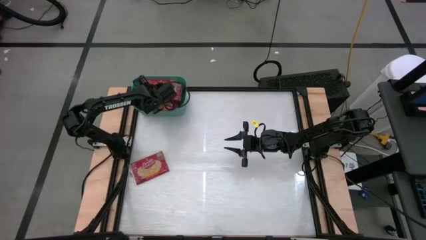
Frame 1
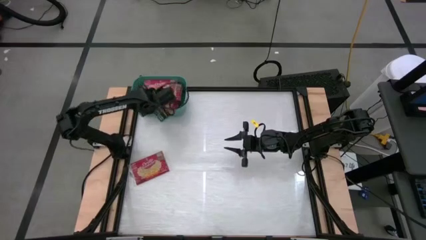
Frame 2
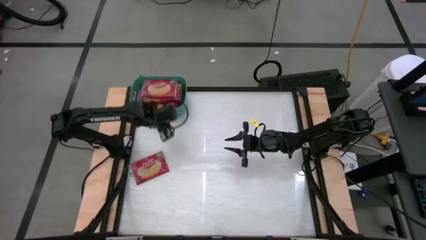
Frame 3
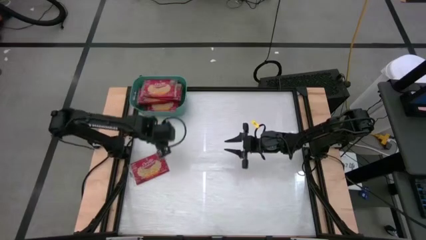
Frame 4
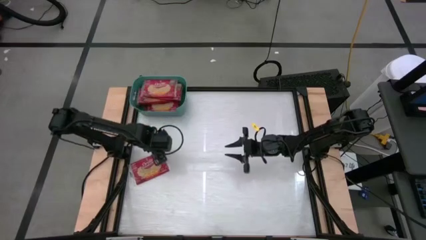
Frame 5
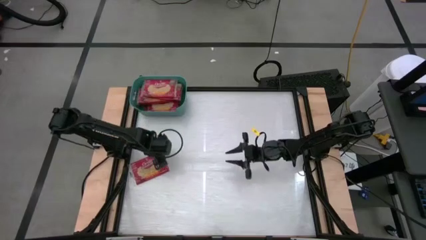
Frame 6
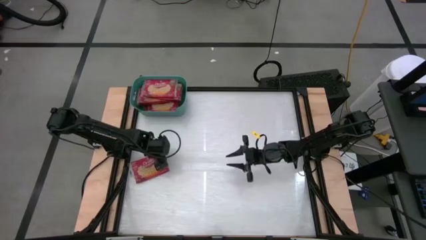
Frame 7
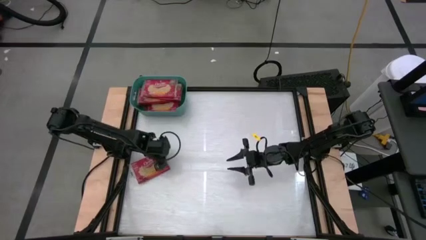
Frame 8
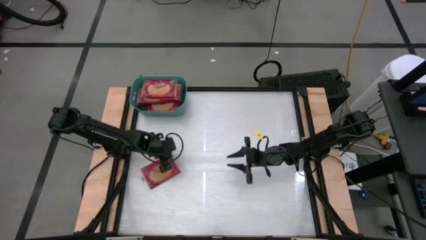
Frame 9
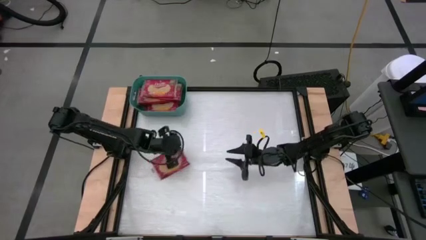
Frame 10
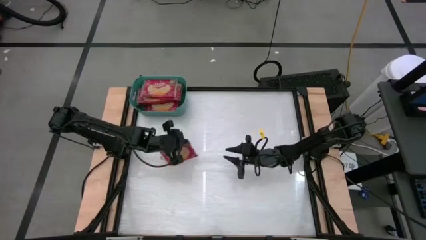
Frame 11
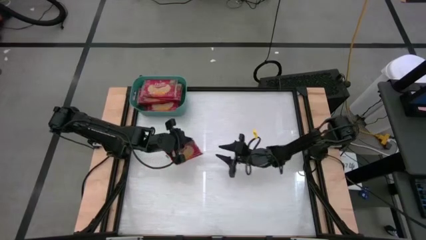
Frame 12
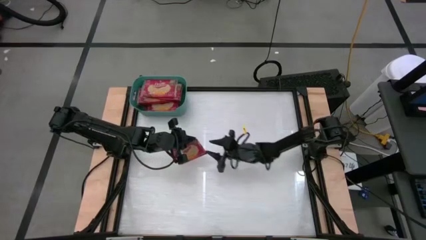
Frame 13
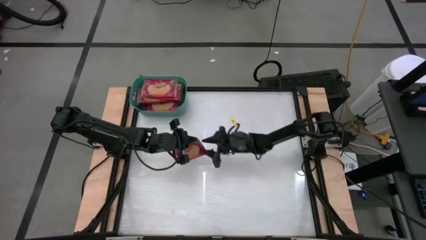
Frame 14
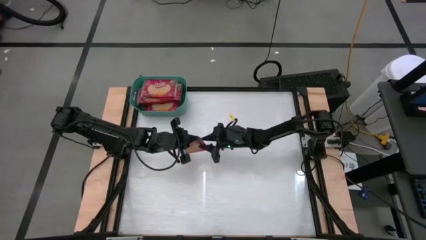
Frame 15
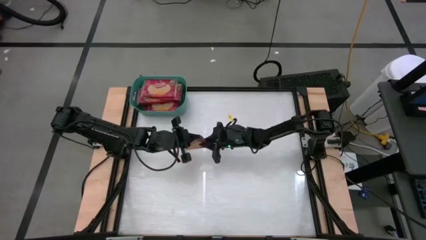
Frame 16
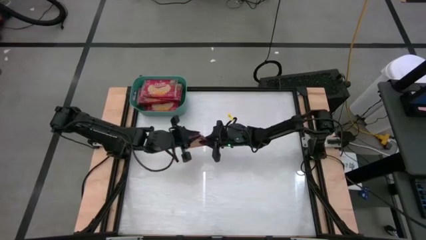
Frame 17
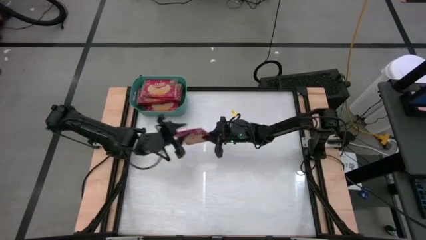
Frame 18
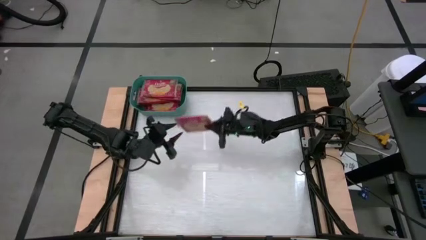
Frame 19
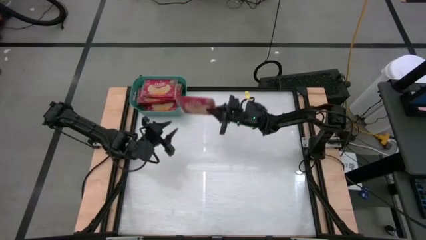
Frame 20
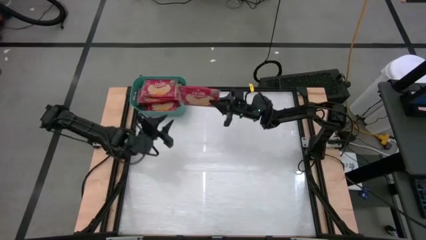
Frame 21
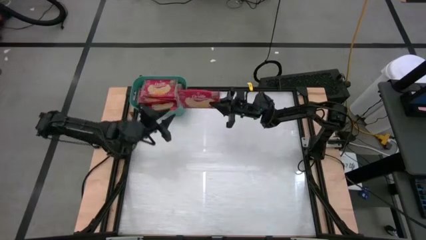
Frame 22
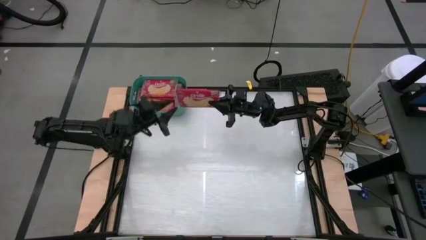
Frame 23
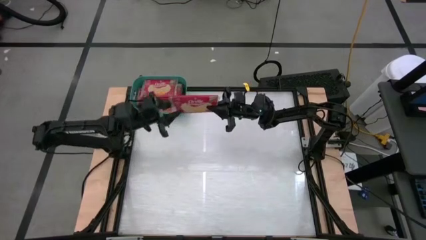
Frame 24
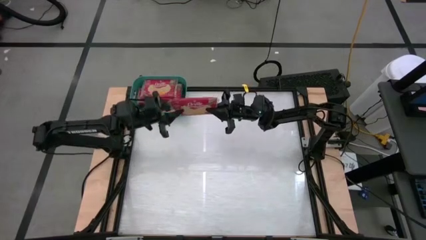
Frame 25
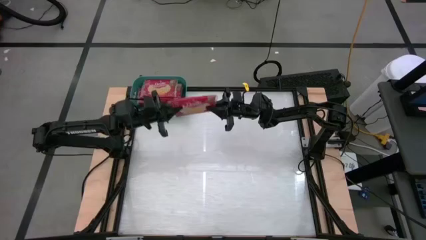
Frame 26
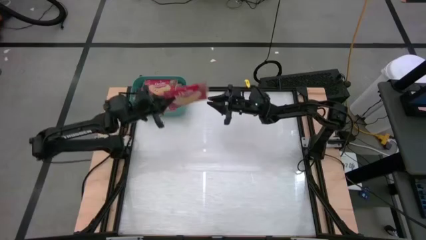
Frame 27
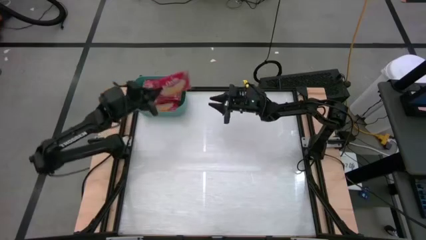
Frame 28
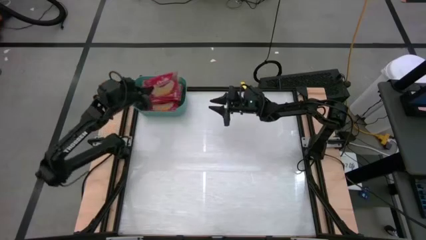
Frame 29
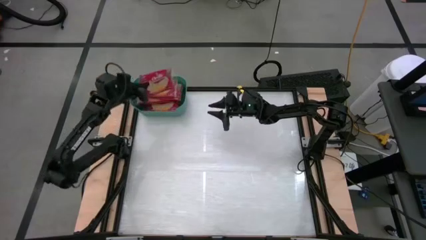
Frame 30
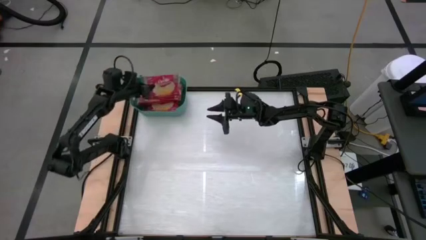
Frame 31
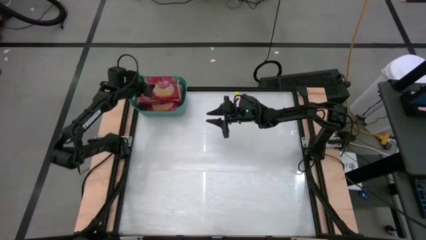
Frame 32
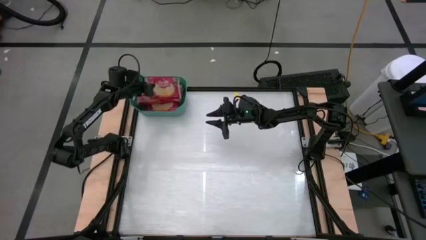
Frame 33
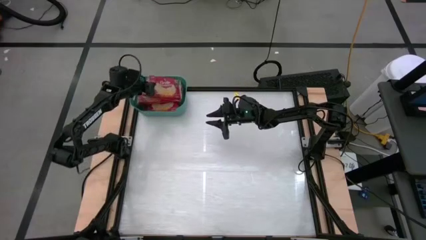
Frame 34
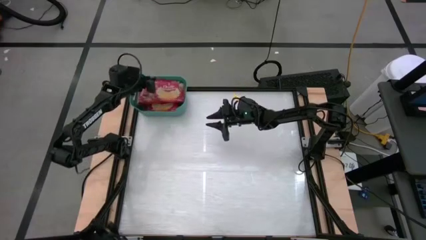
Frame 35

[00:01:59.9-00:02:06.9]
Task: Sort popcorn bags into baskets
Stack the red popcorn bag on the red popcorn bags in the green bin

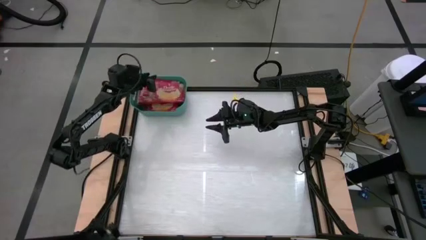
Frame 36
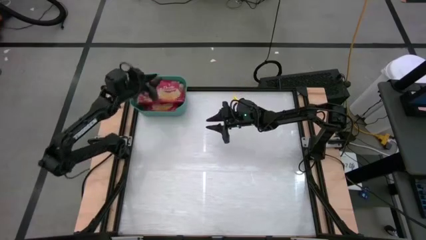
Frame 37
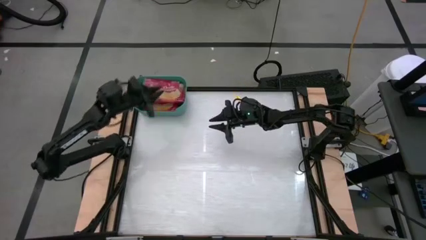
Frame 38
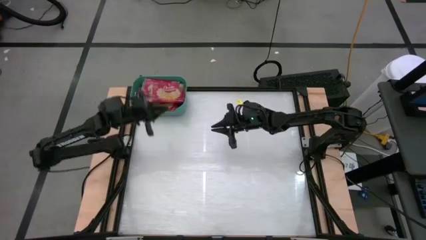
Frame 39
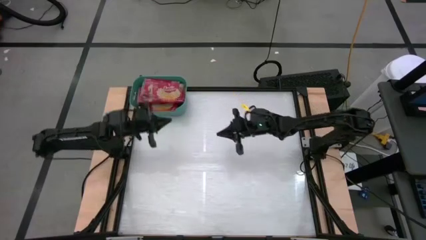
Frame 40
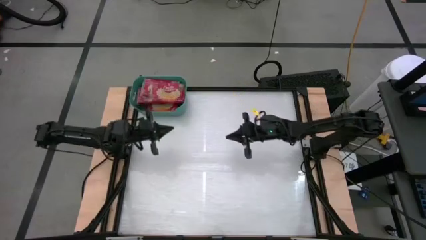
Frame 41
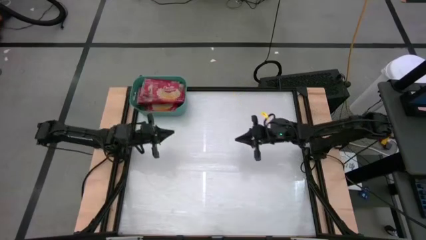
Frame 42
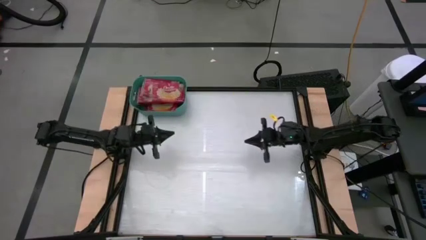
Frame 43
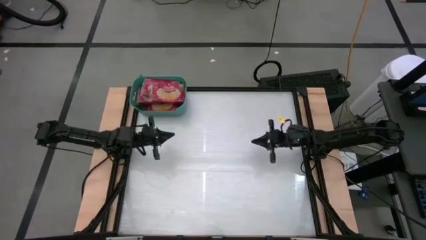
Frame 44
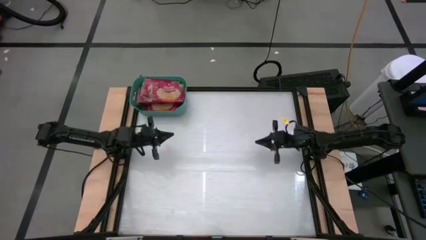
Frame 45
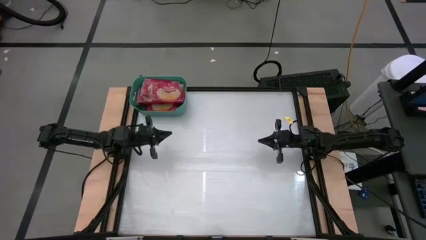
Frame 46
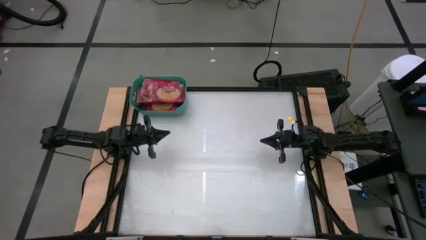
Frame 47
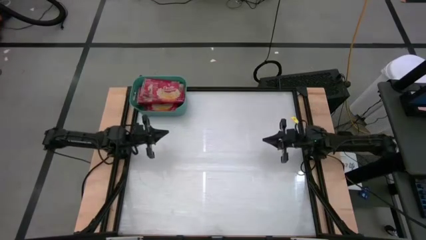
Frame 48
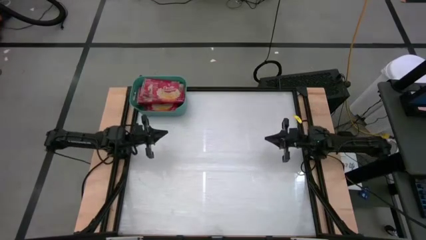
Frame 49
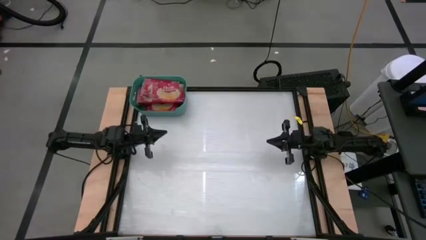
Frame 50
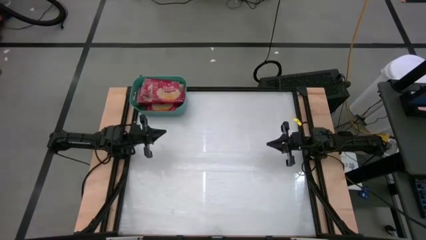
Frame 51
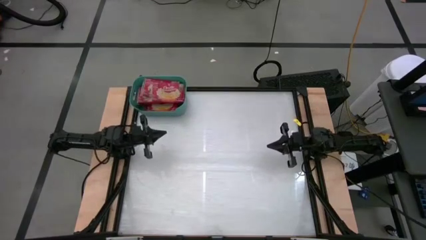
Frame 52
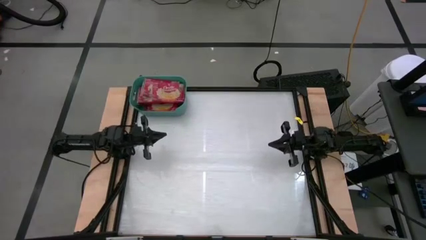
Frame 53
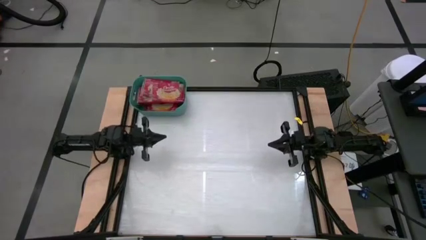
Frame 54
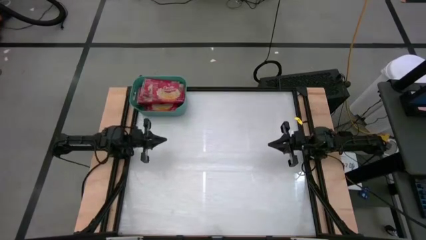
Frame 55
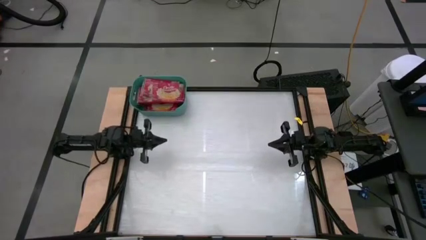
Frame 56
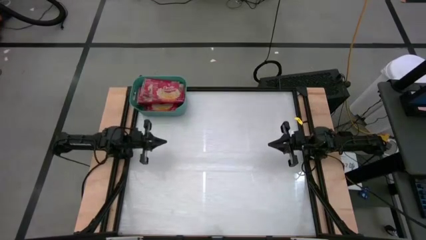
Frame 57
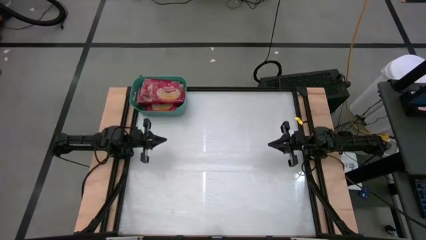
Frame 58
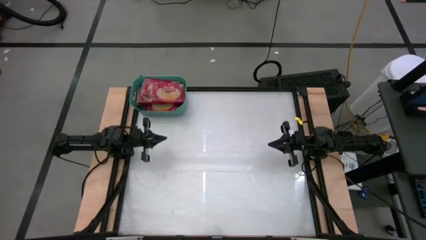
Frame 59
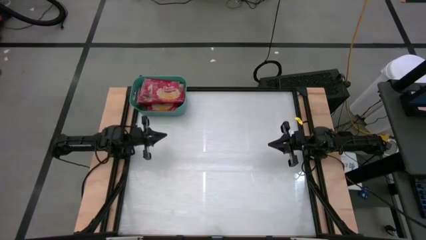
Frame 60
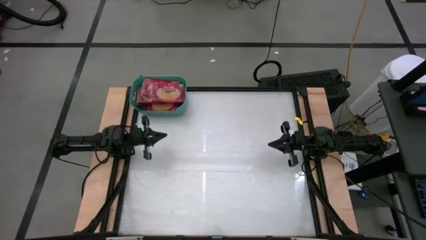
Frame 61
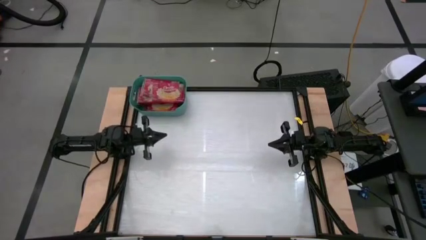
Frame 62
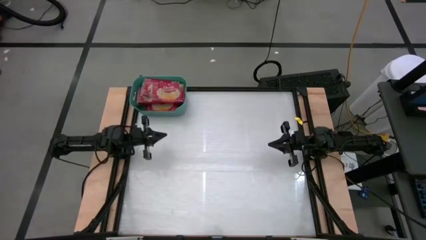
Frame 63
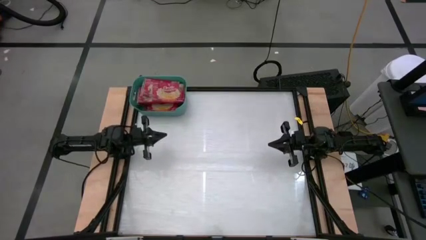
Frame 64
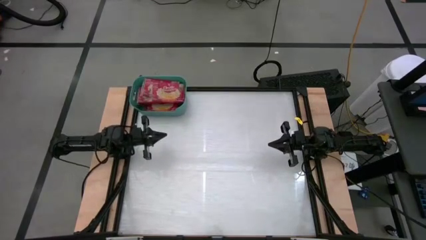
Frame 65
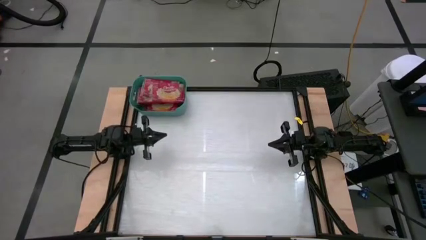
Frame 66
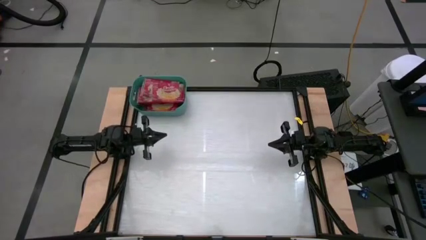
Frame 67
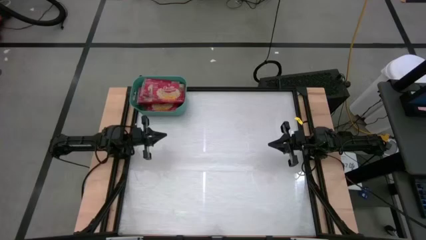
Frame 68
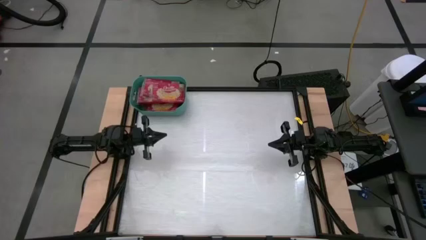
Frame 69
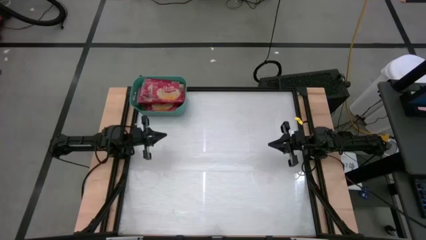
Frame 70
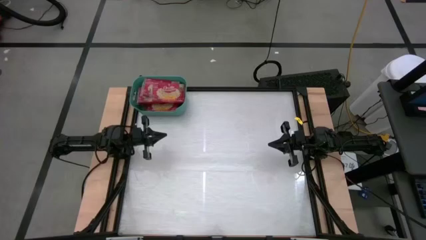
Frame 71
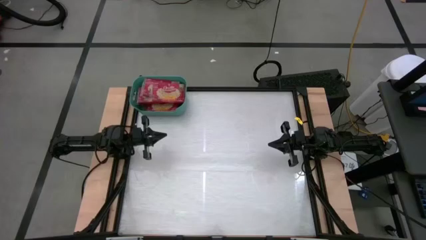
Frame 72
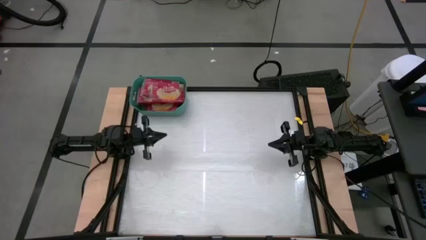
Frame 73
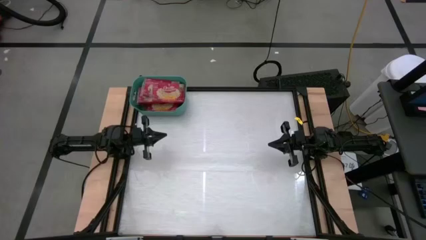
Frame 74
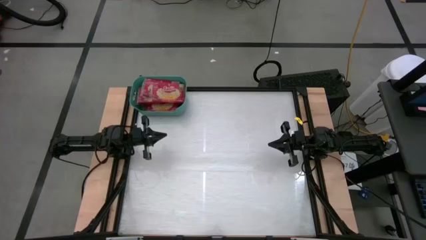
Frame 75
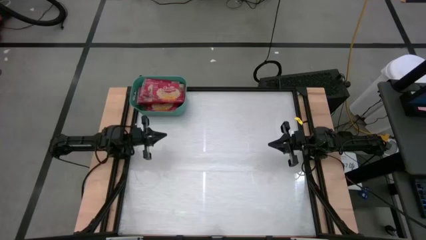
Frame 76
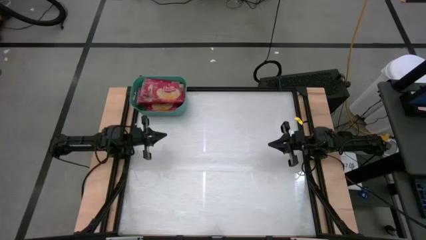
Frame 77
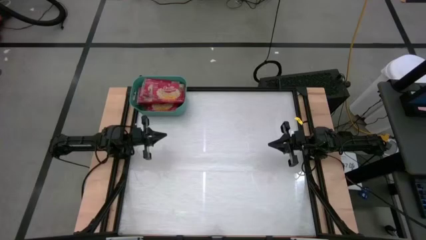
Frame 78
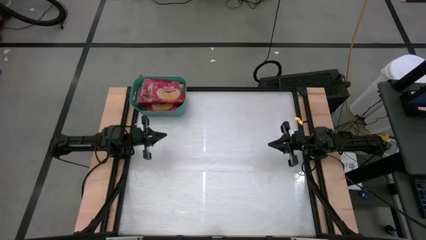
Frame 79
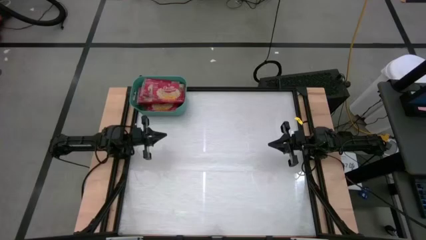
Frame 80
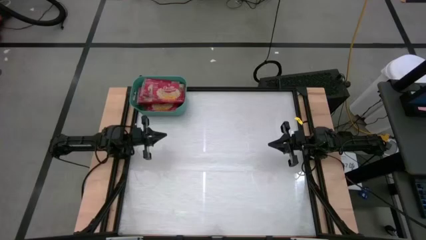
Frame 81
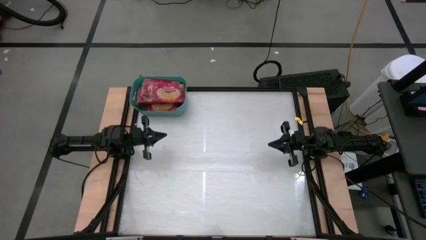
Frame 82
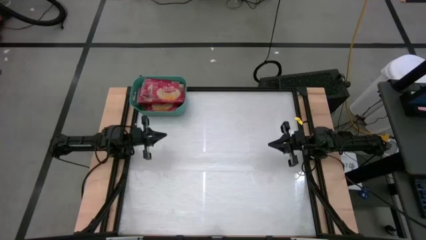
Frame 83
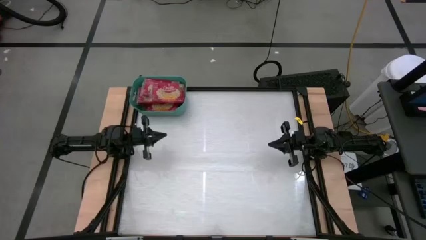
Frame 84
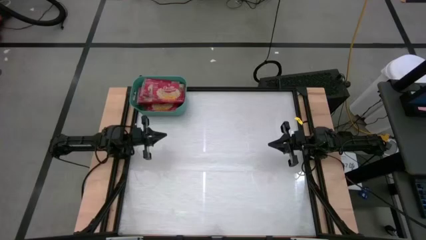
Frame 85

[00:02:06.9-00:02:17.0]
Return to Home Position
